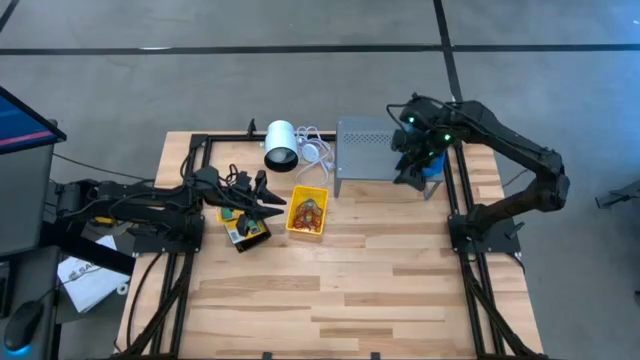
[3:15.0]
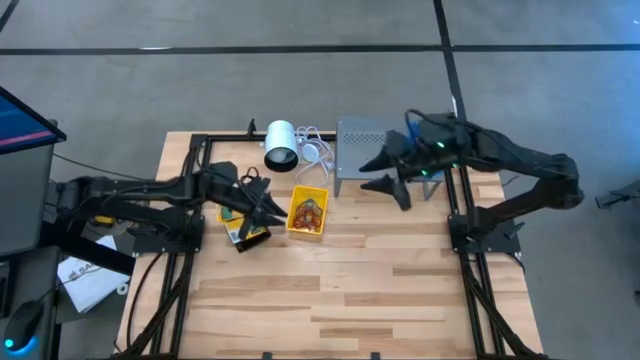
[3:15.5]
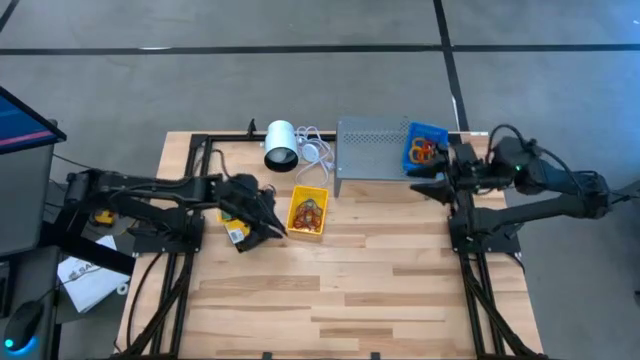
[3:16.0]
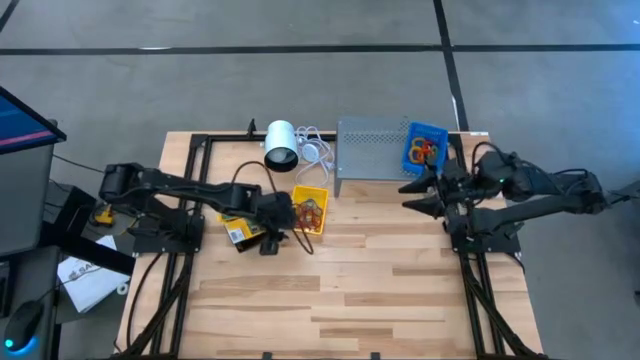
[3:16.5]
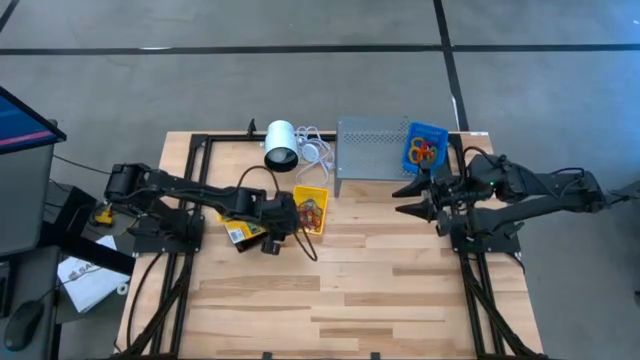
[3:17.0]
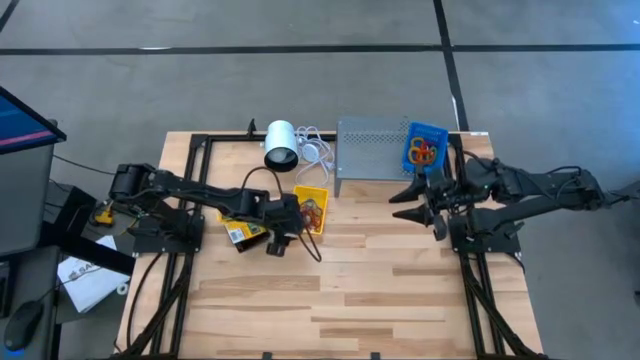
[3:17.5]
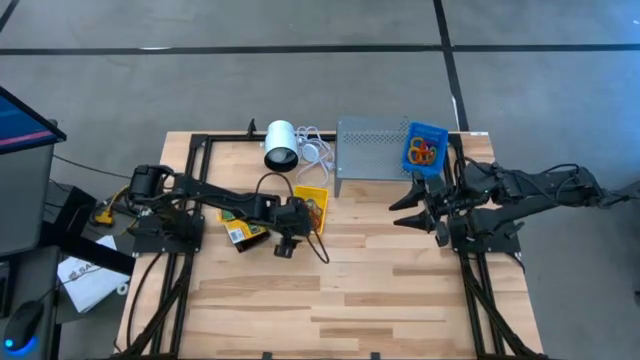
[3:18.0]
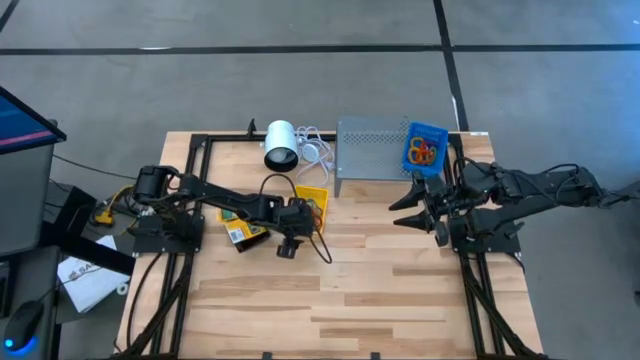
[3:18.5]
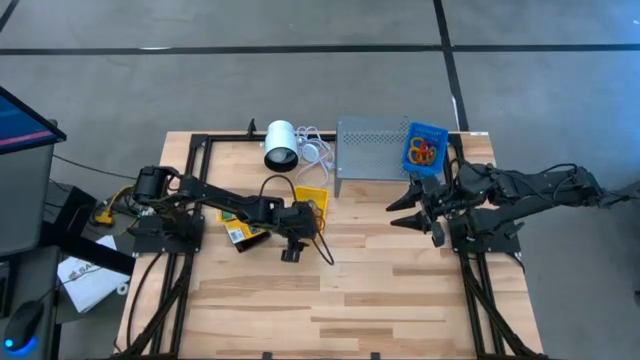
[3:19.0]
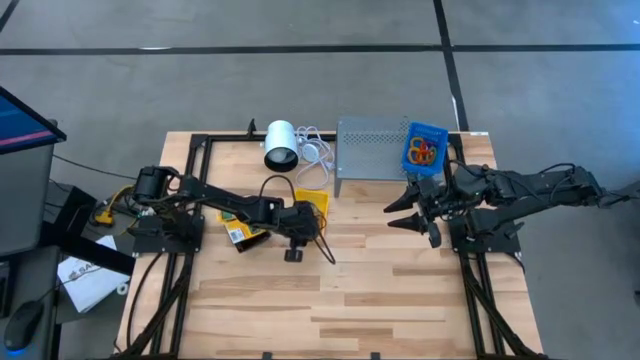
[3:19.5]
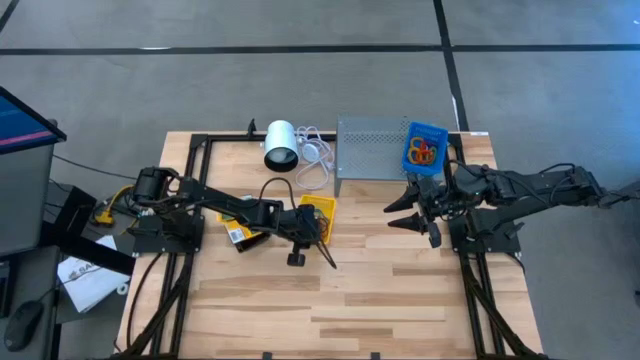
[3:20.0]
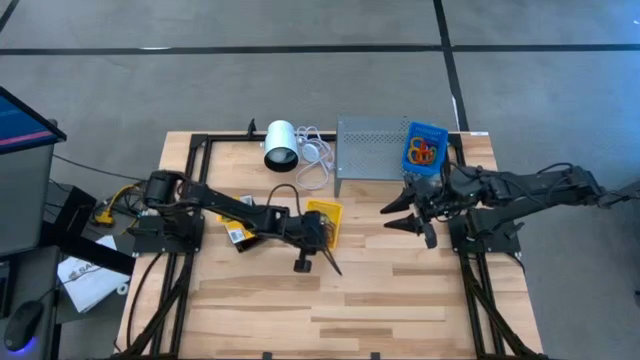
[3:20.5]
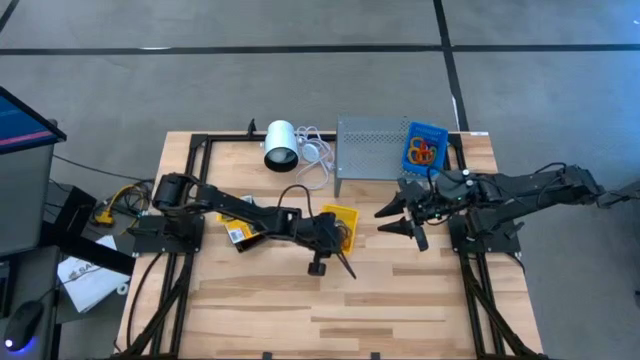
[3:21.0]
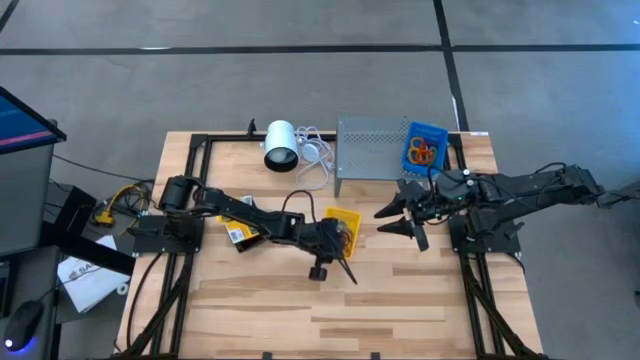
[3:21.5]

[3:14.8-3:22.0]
Task: Pick & Place Office Desk Supplies
Adjust the yellow basket filled with rubber bands

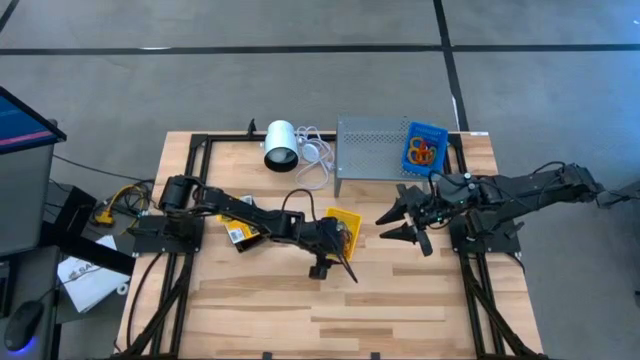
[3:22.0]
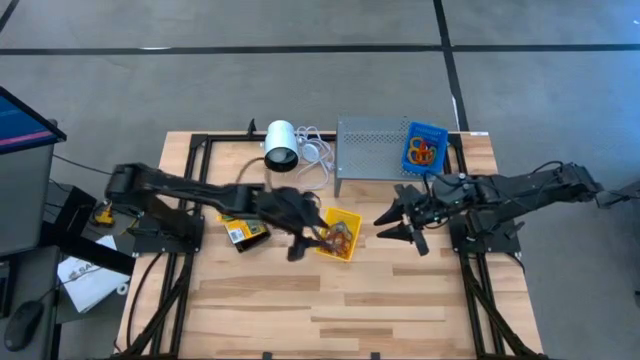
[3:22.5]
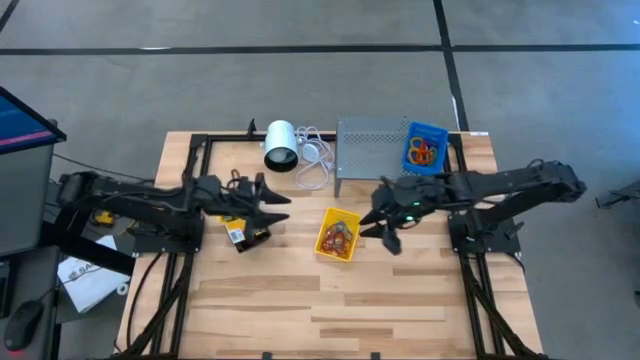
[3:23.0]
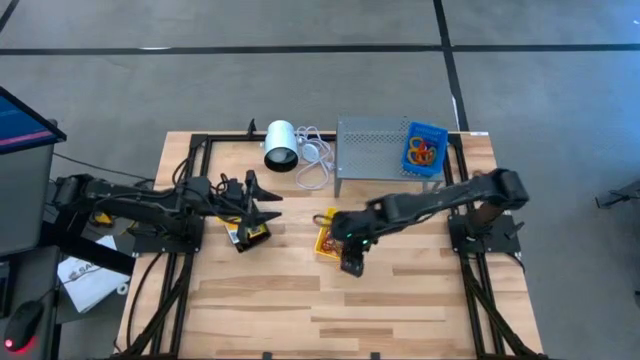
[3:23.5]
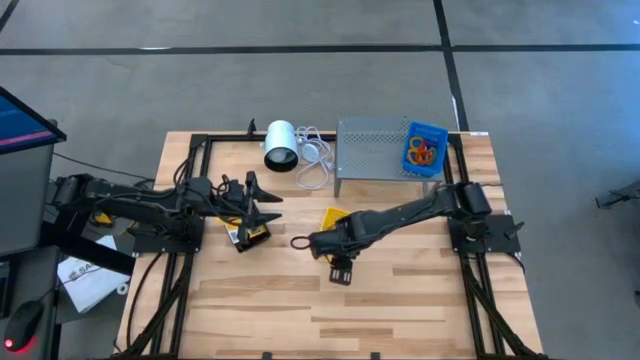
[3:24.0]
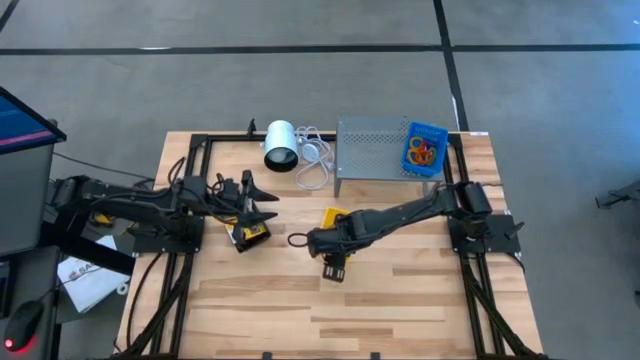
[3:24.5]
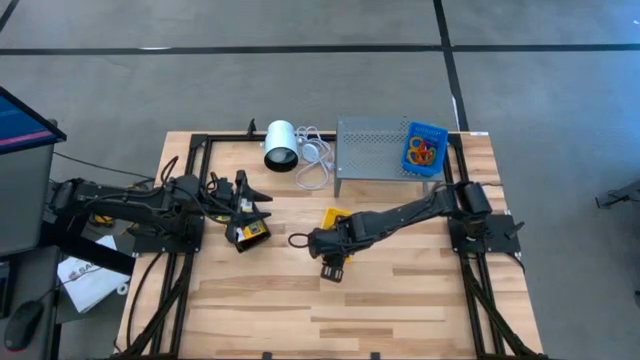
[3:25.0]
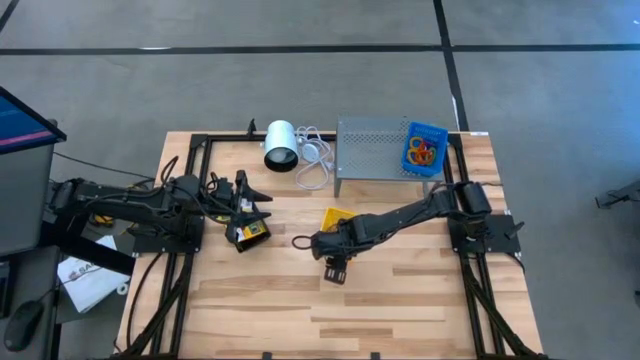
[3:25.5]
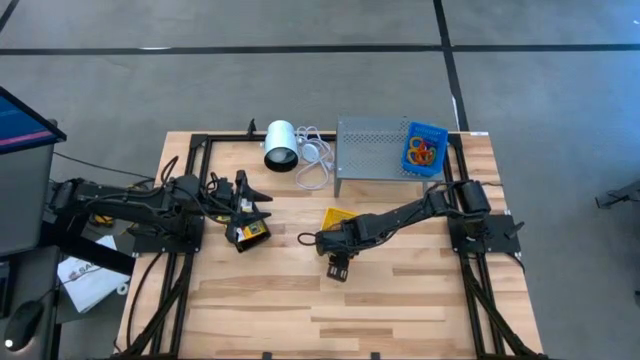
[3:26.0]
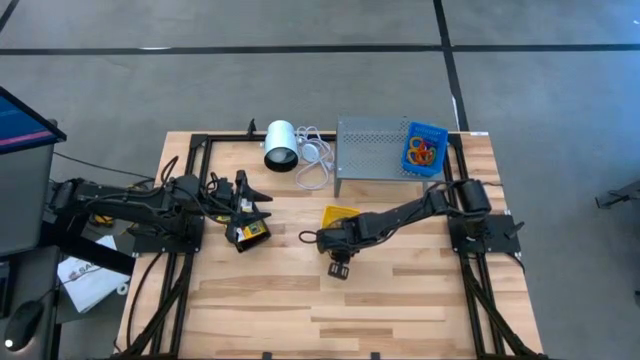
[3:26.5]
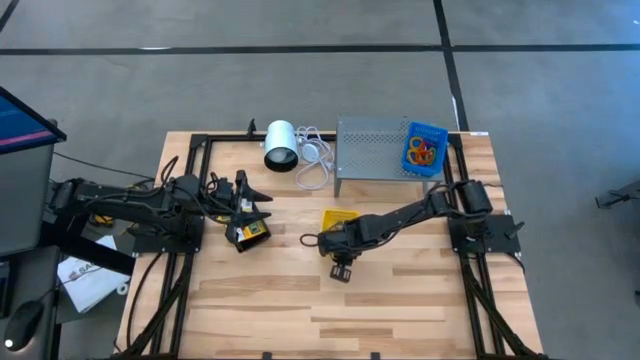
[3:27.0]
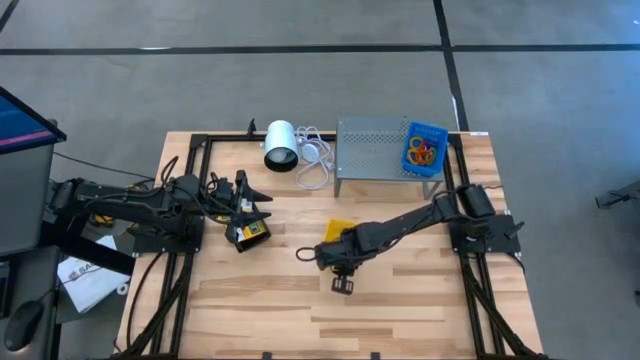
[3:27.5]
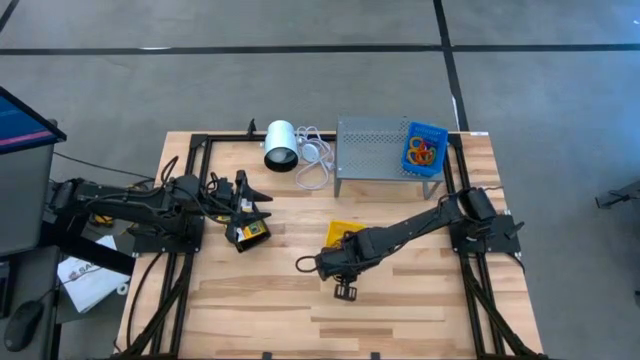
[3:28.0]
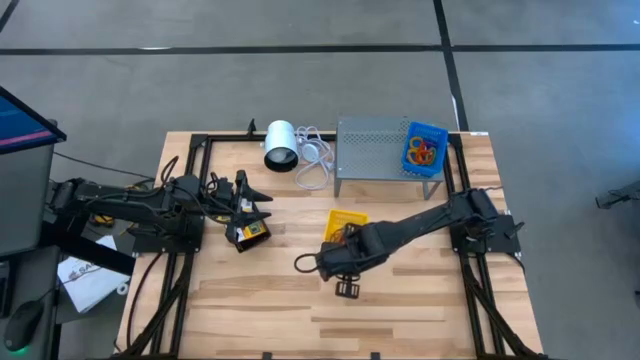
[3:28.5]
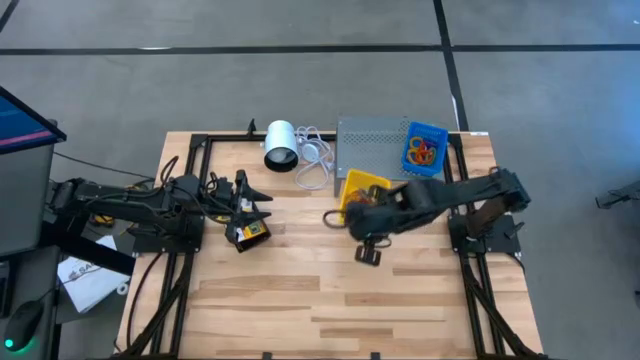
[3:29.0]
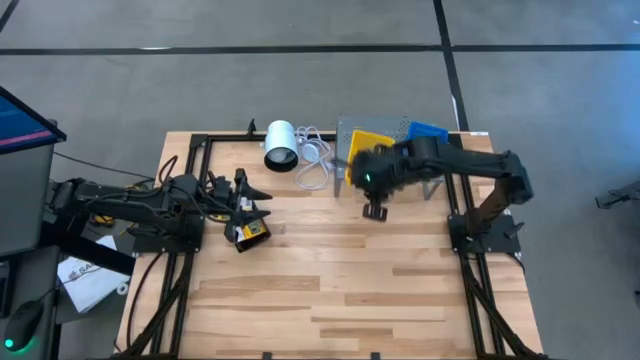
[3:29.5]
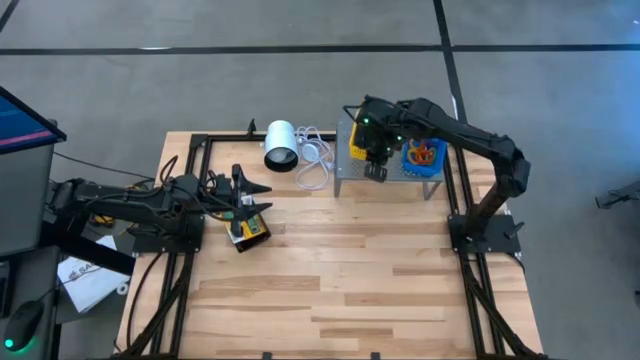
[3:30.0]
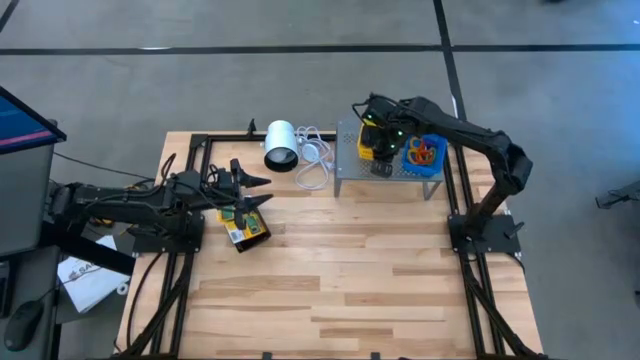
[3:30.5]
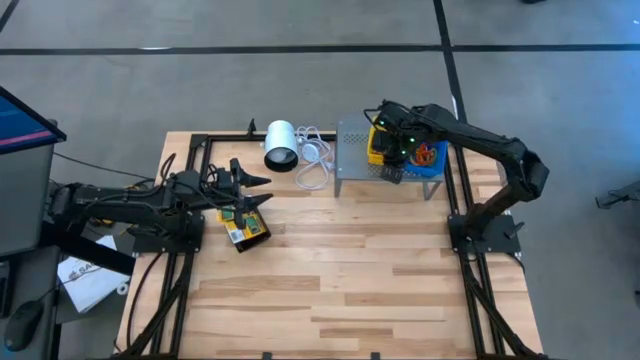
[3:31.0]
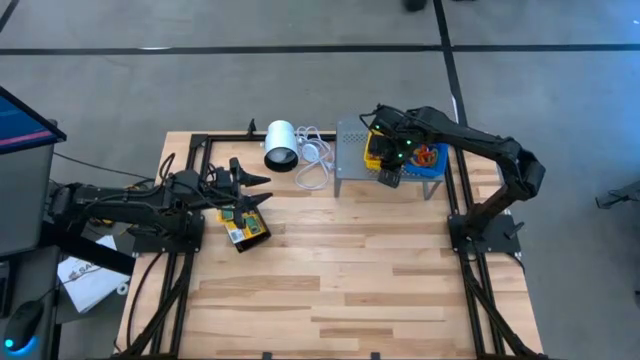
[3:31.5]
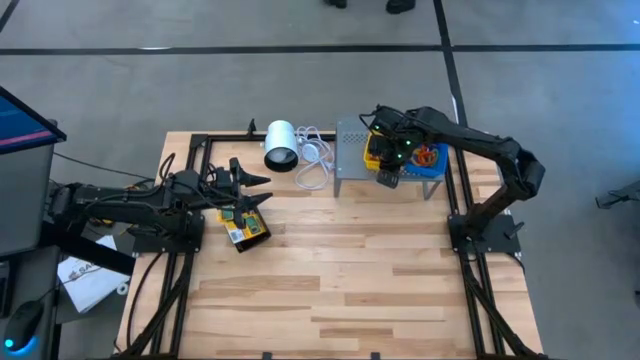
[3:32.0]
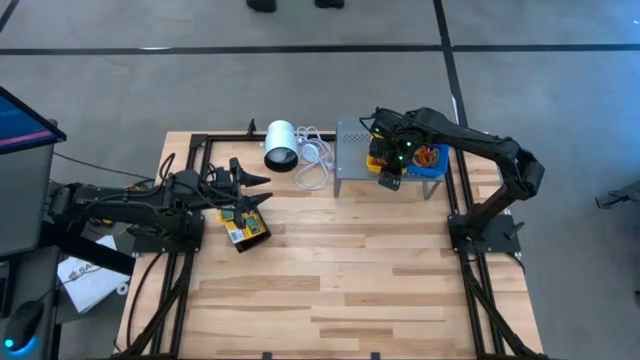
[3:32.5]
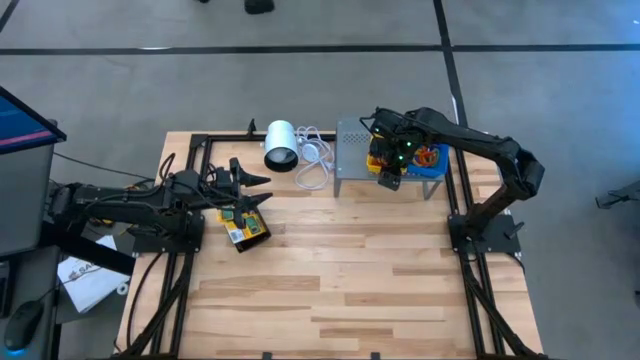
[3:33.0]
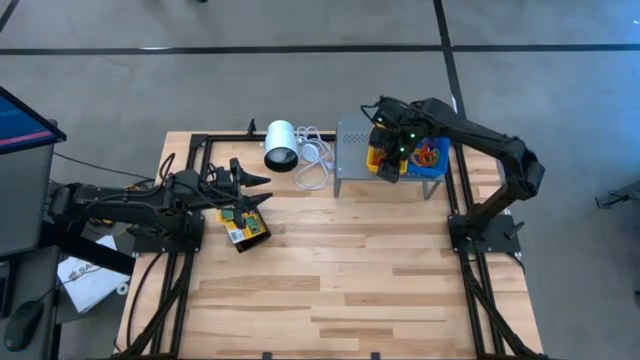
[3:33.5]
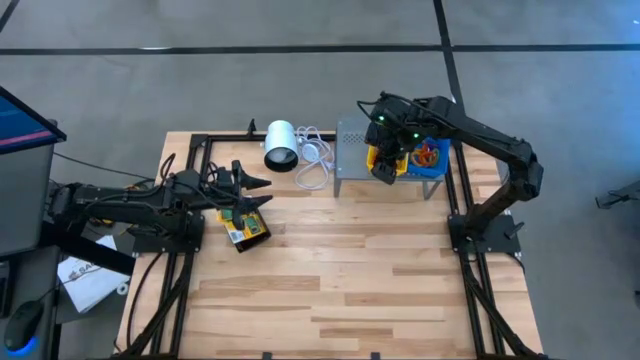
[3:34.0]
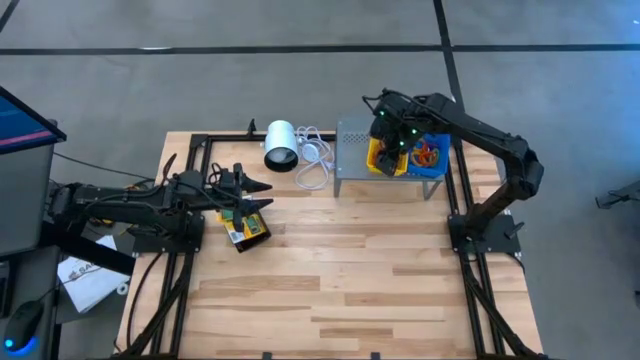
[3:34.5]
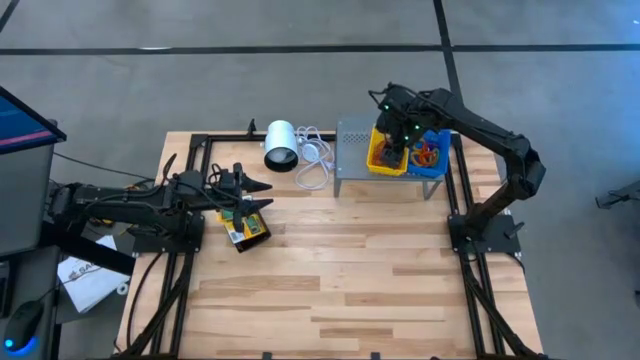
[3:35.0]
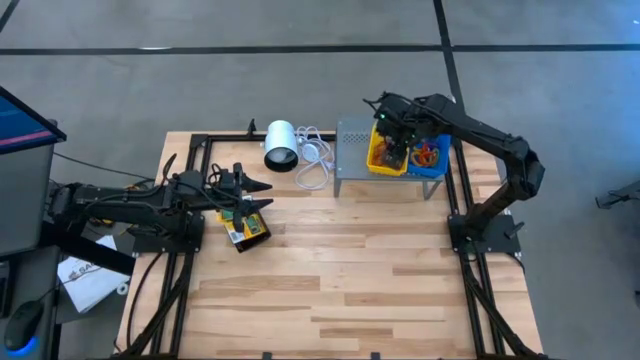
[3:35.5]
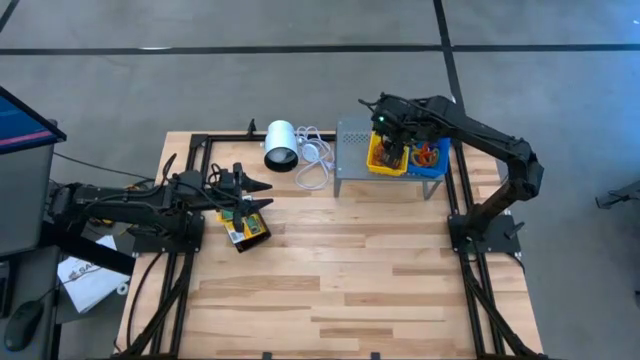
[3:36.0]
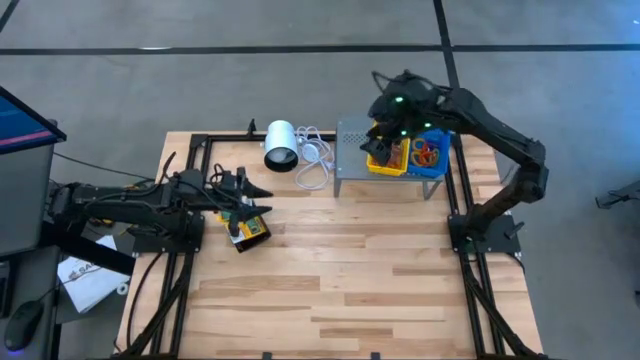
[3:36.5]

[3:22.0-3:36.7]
Put the yellow basket filled with rubber bands on the shelf
